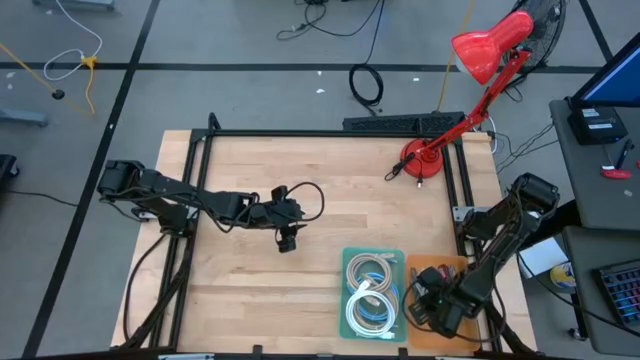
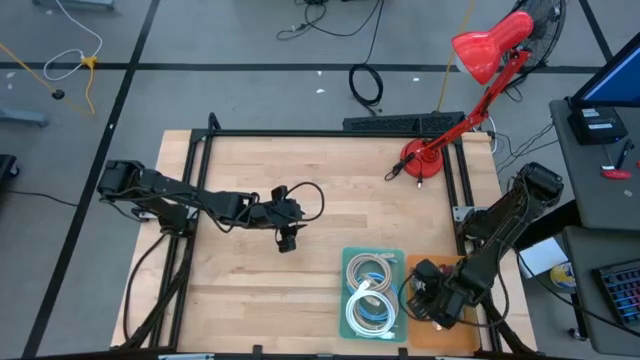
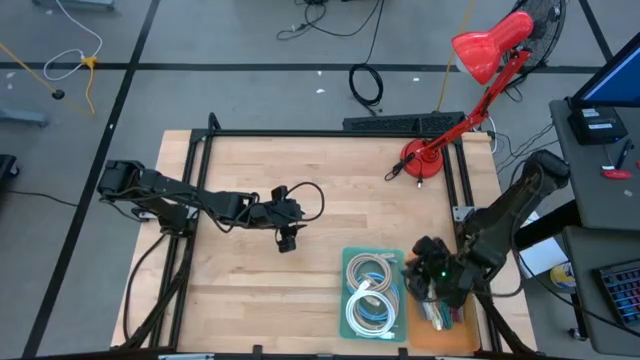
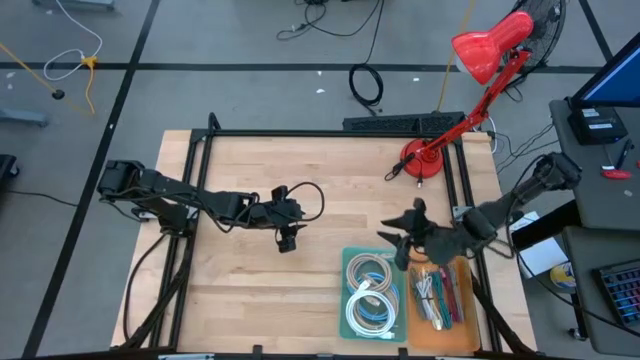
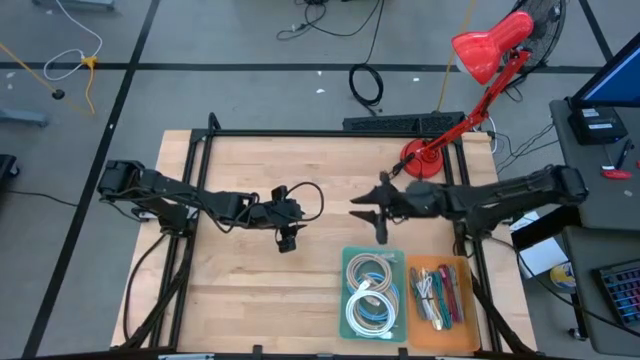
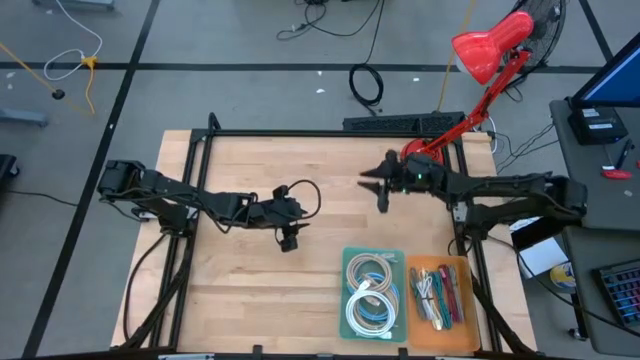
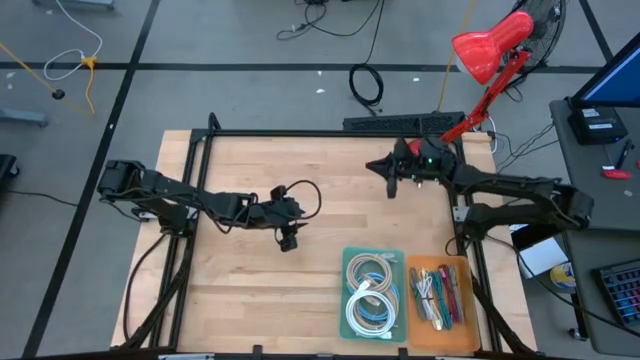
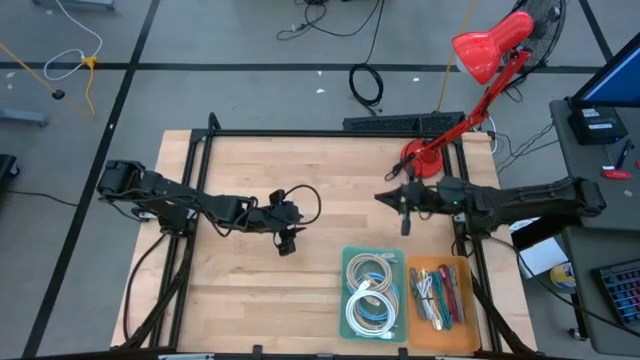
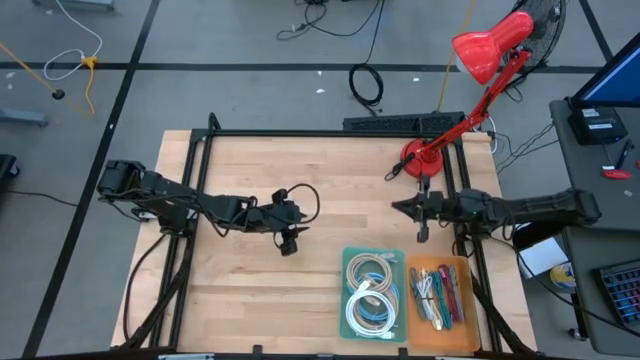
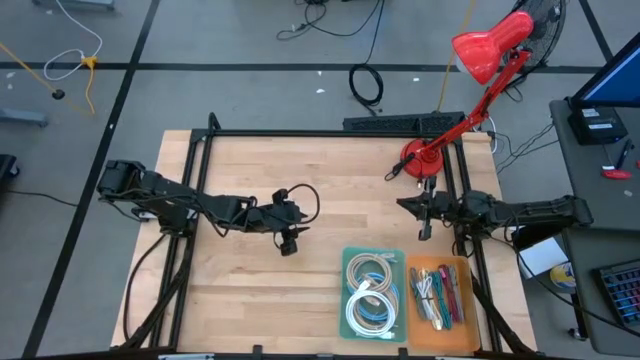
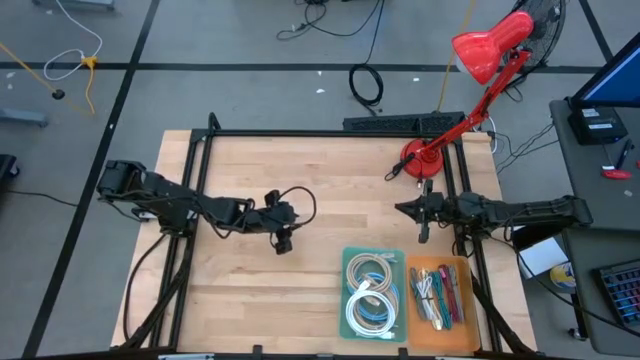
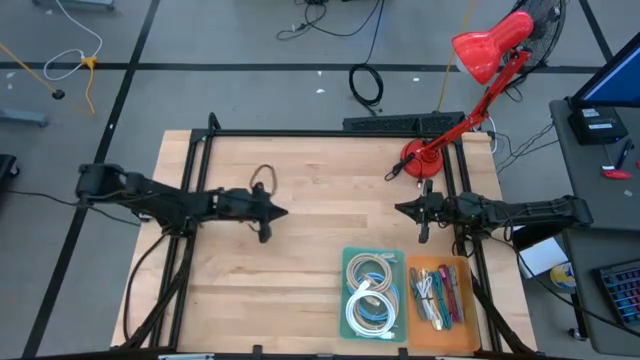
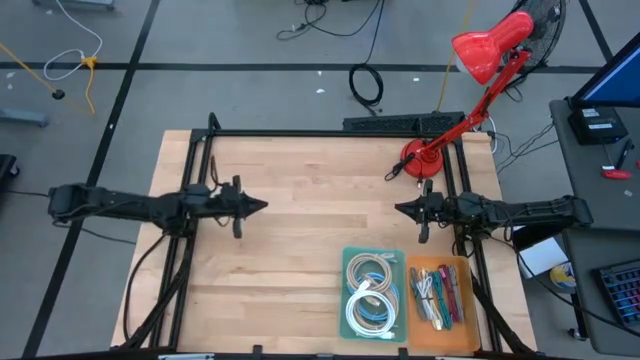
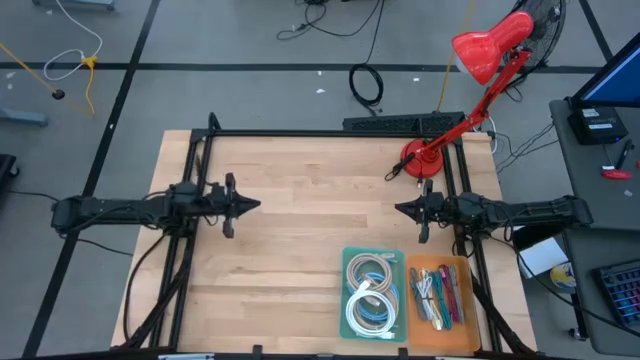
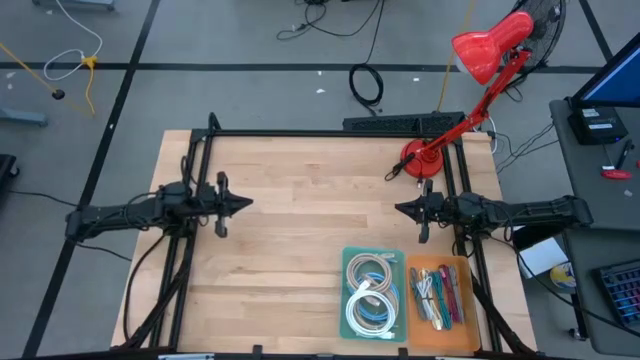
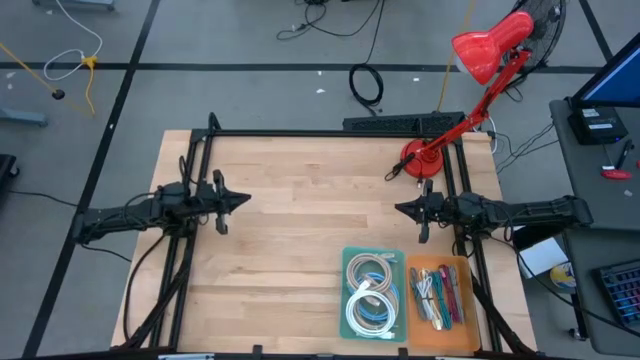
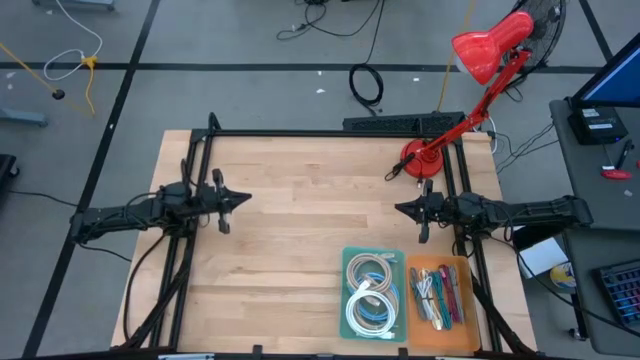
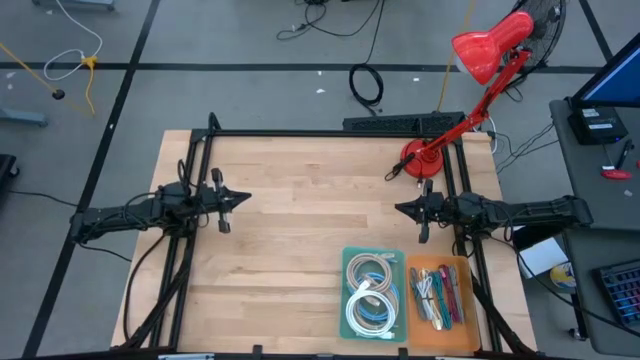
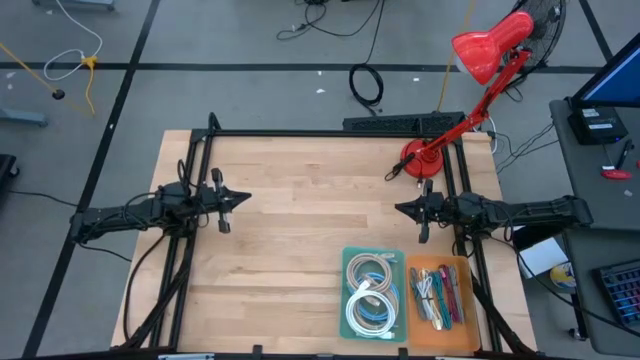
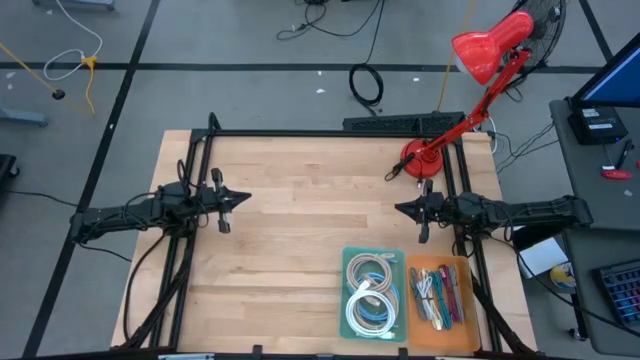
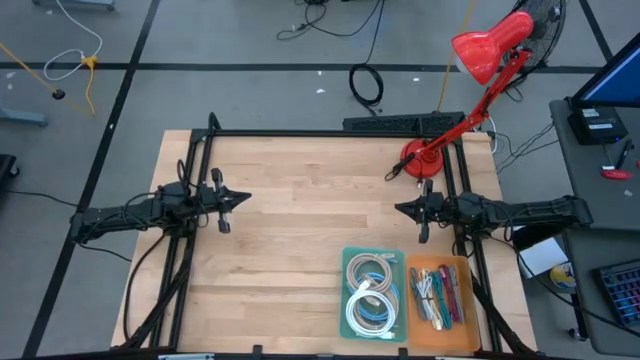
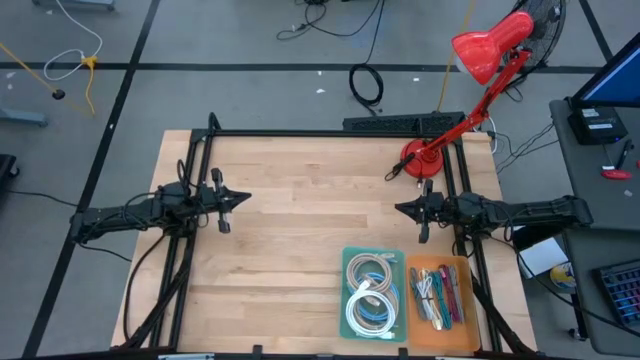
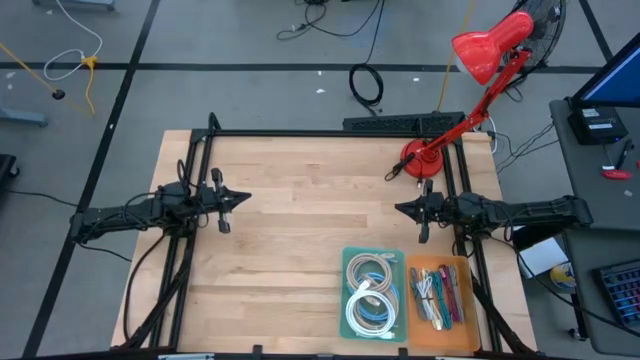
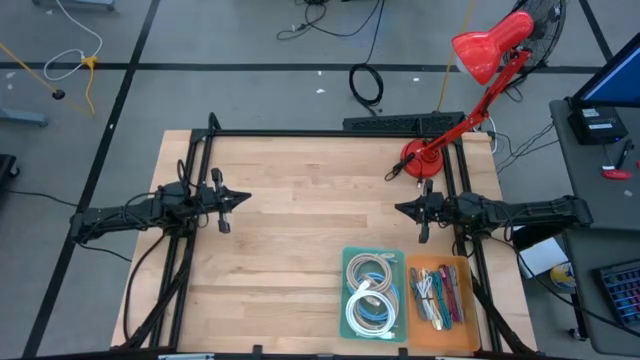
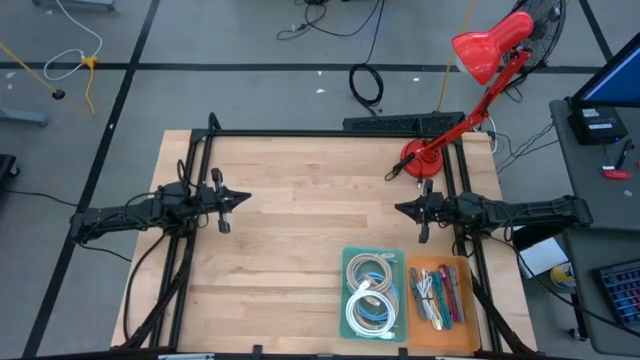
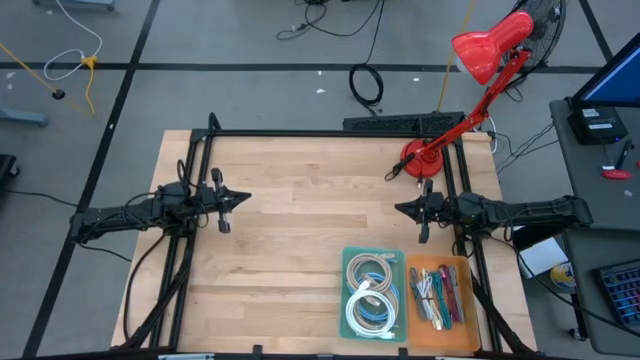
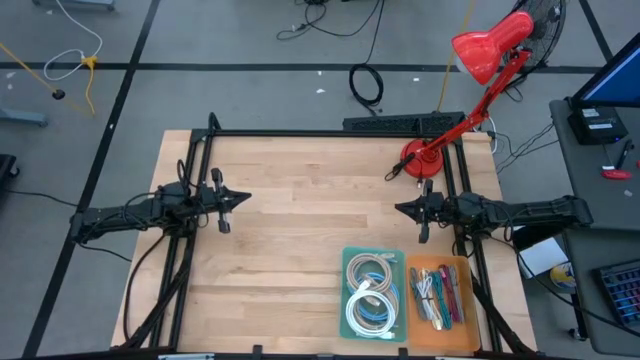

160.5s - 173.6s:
Task: Pick & Place USB Port
Return to Home Position

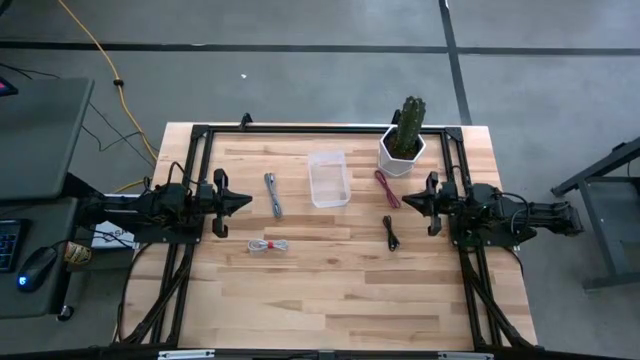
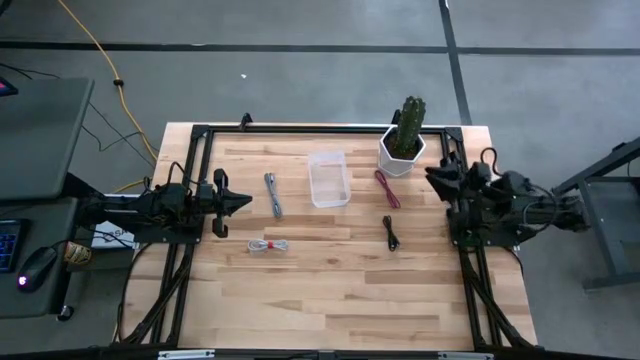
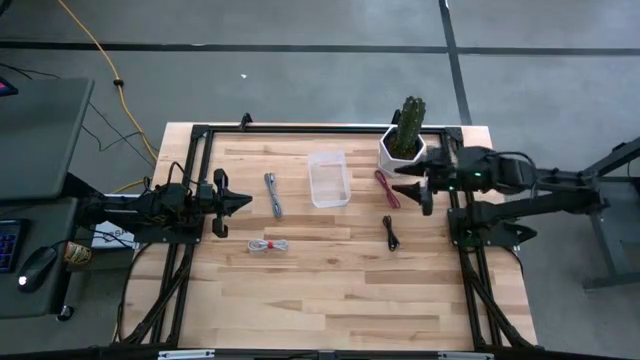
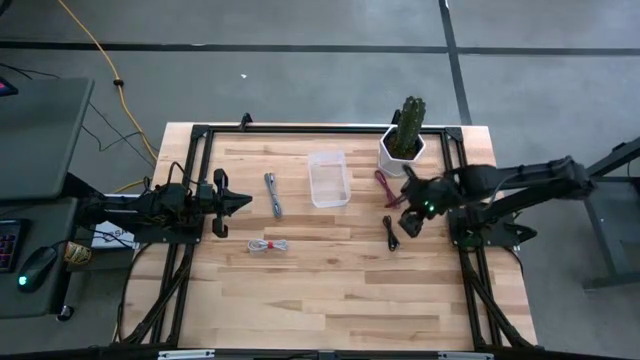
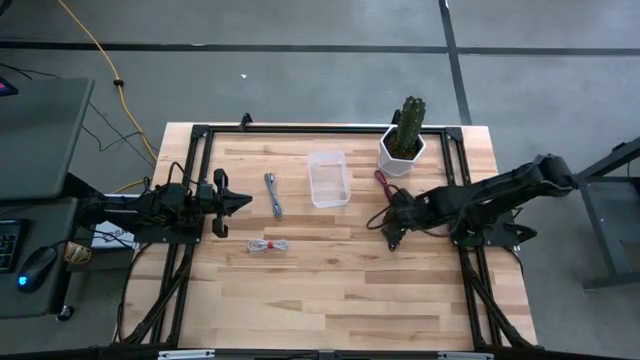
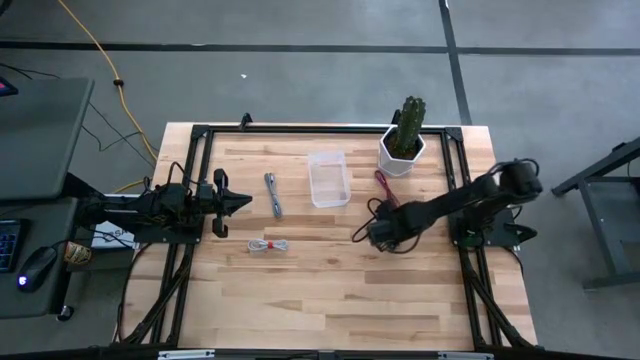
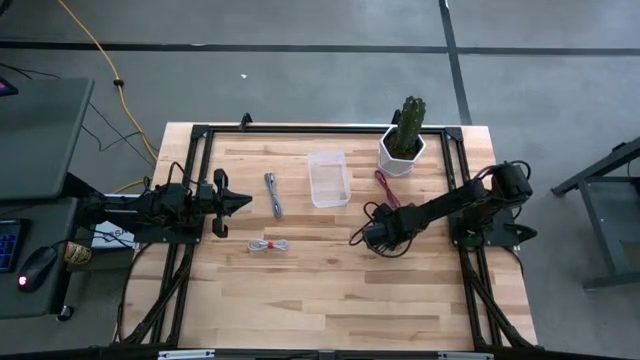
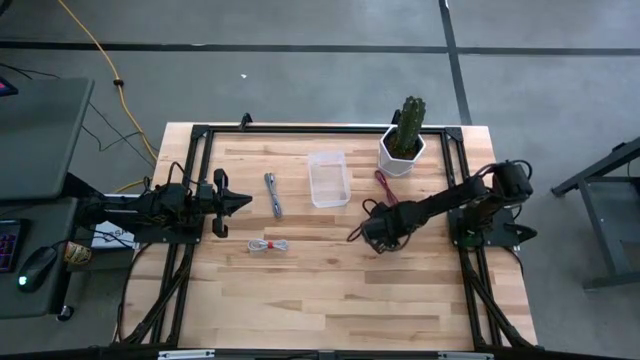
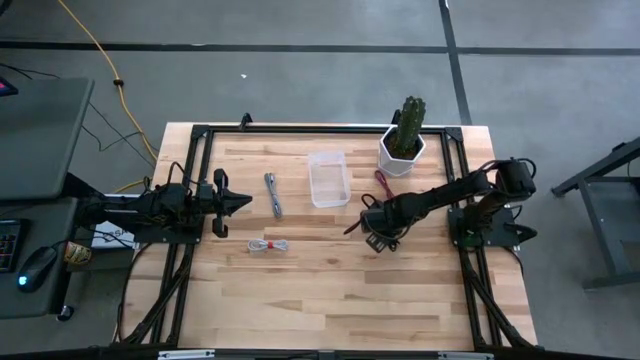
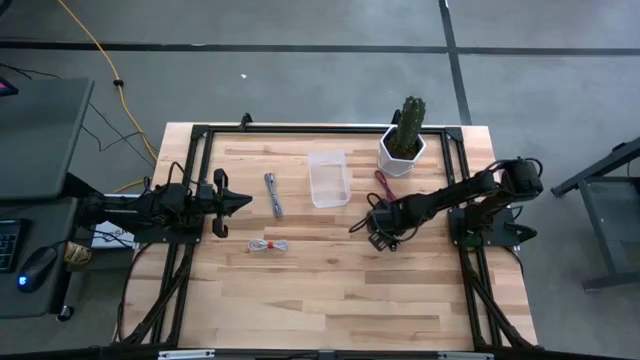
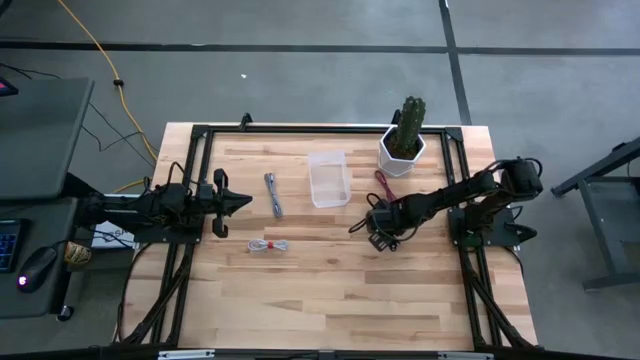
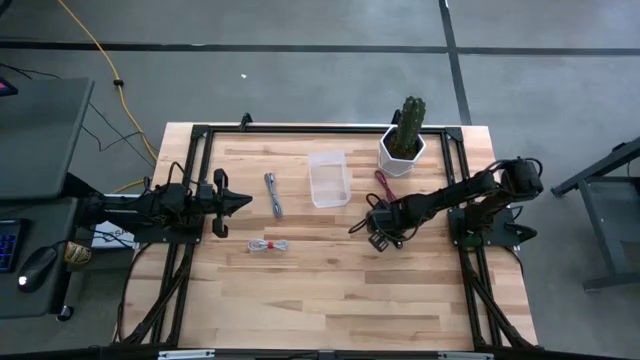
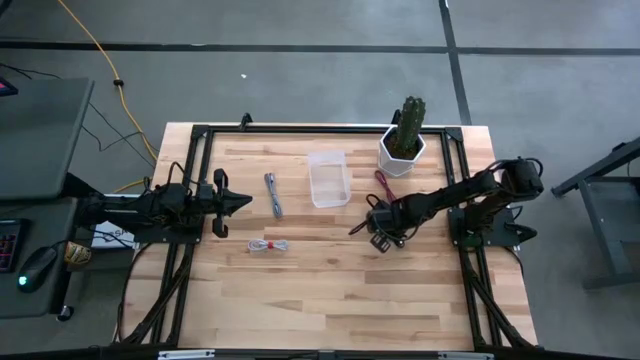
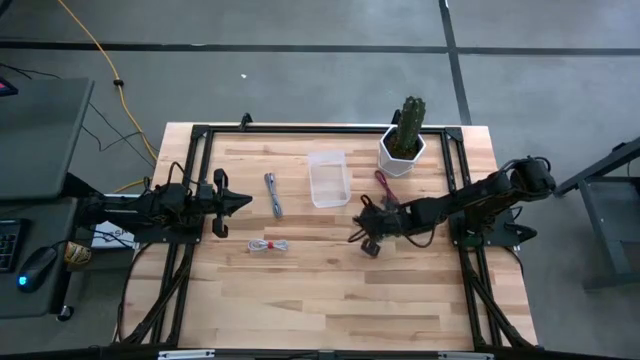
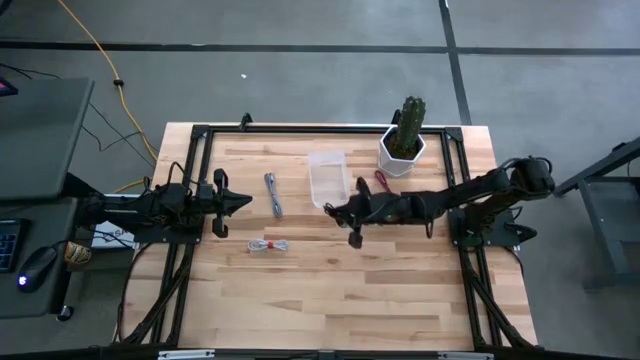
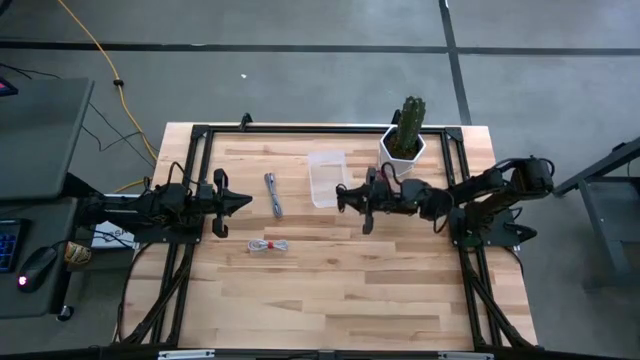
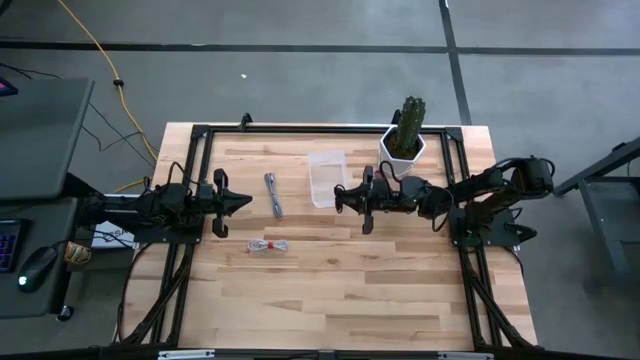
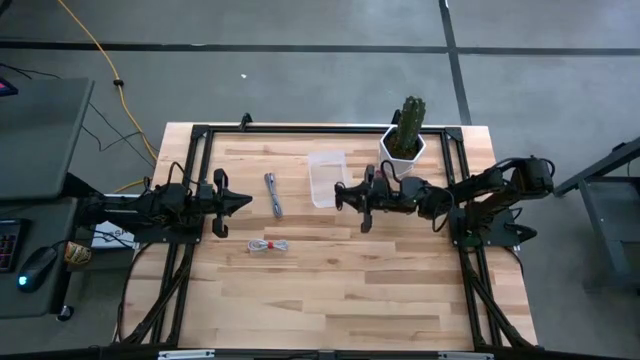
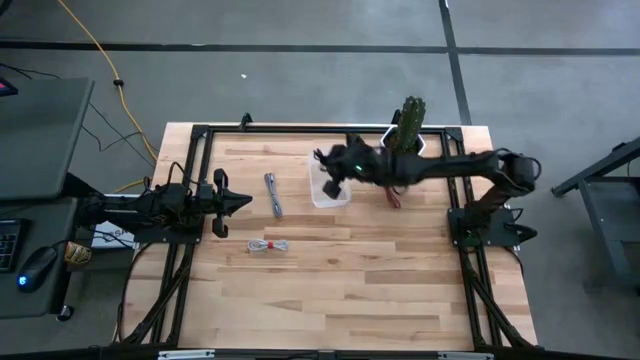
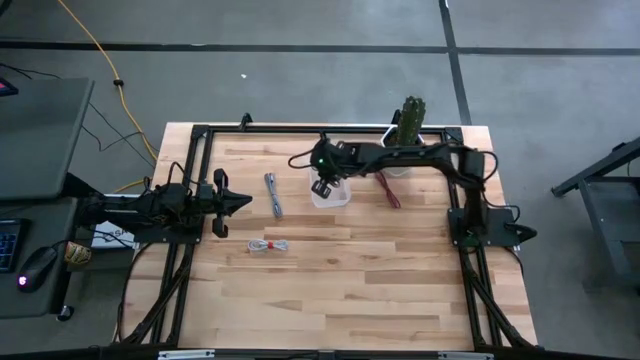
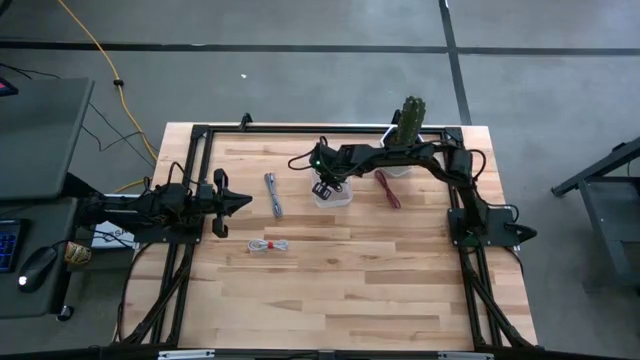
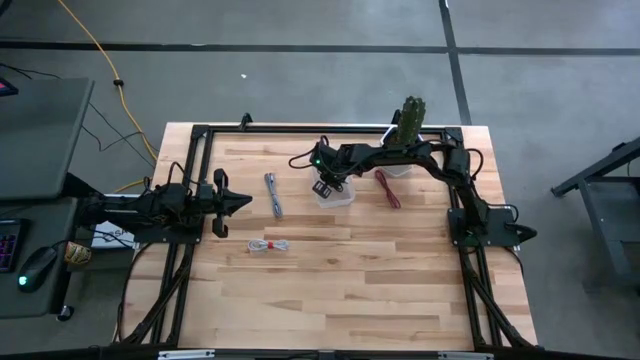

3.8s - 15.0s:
Task: Pick and place USB-C Cables
Put the black charger cable into the transparent bin
